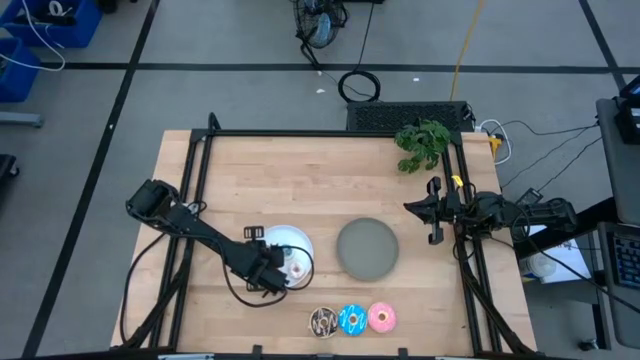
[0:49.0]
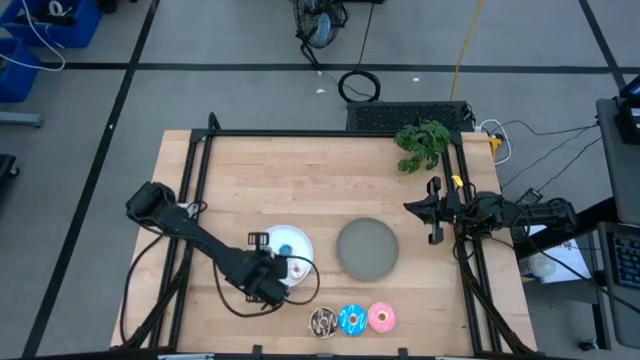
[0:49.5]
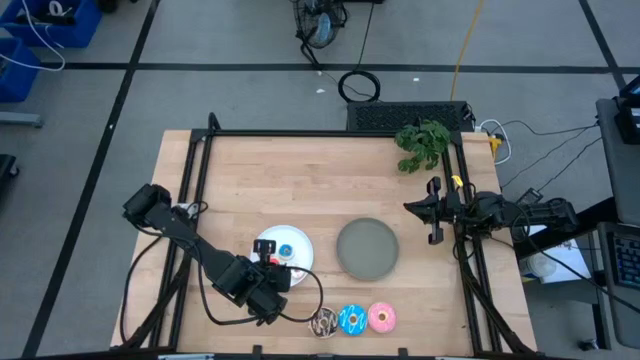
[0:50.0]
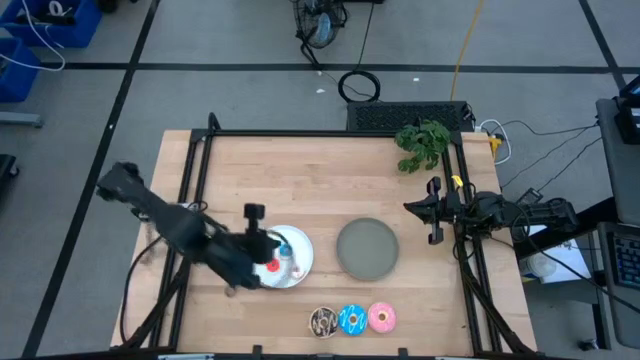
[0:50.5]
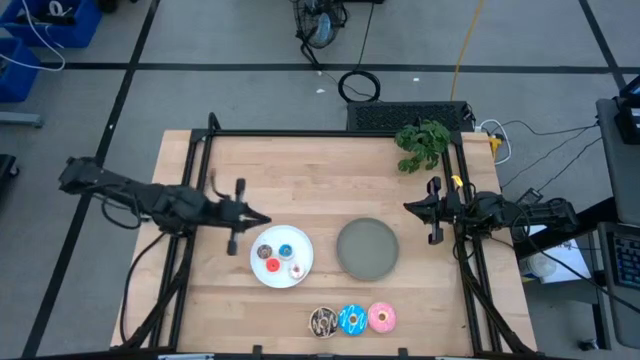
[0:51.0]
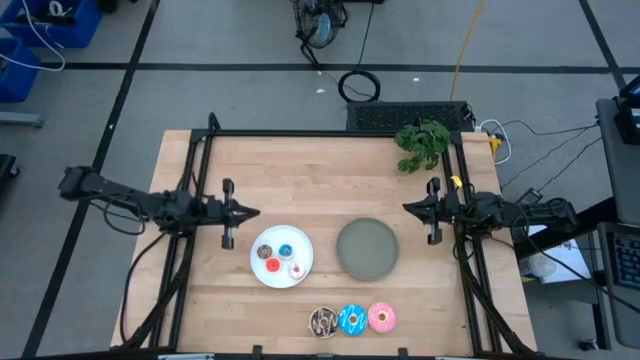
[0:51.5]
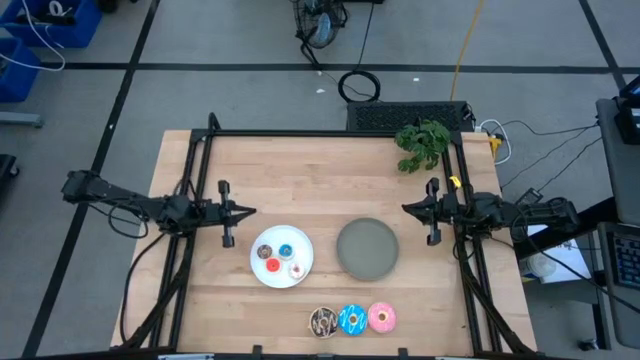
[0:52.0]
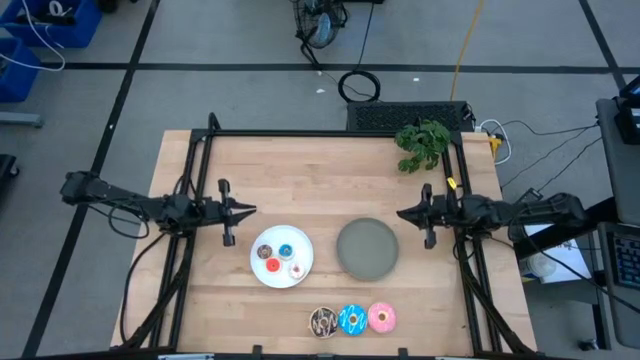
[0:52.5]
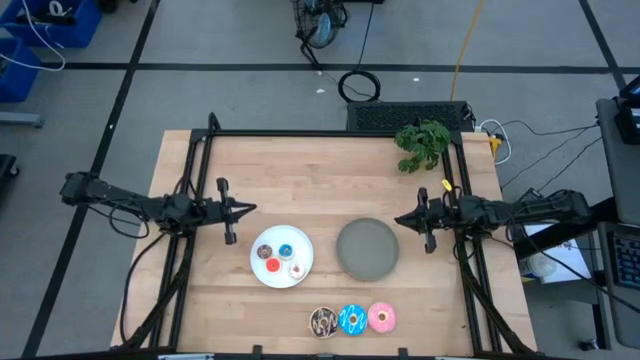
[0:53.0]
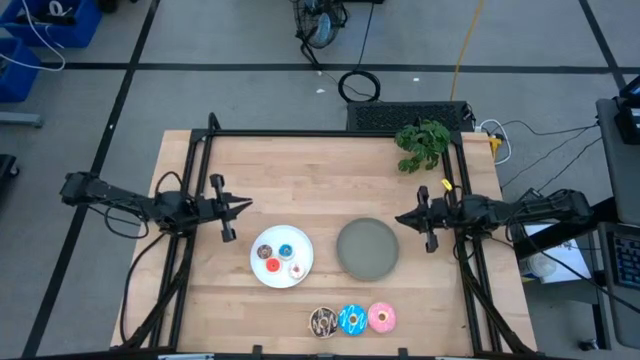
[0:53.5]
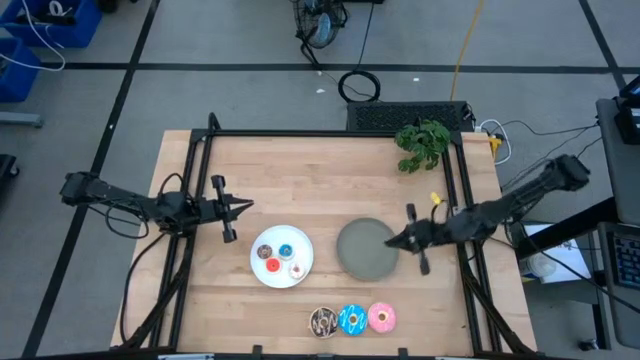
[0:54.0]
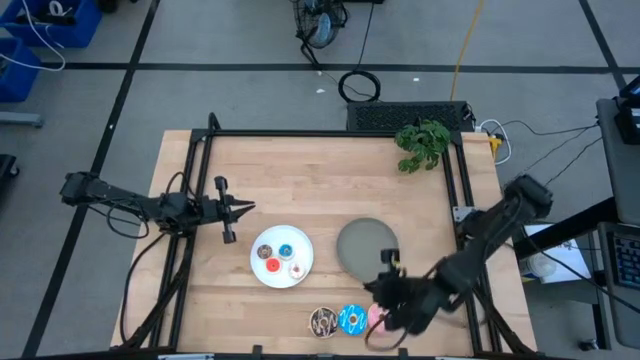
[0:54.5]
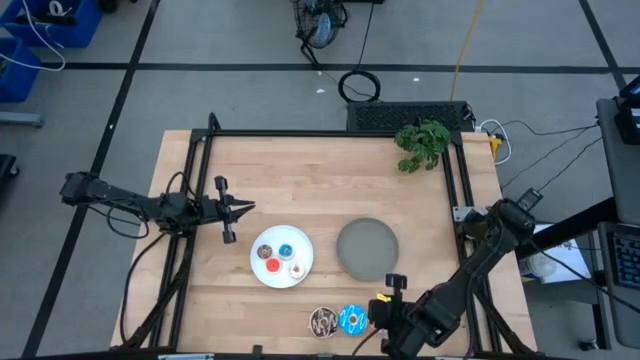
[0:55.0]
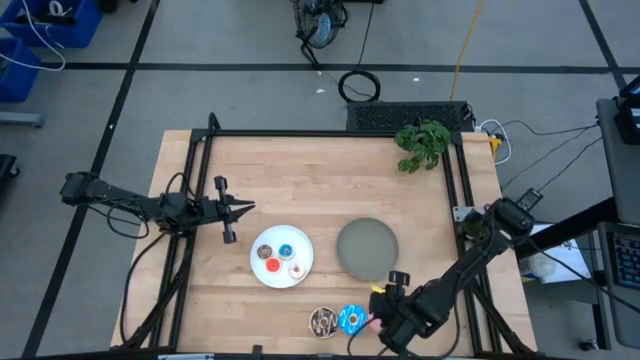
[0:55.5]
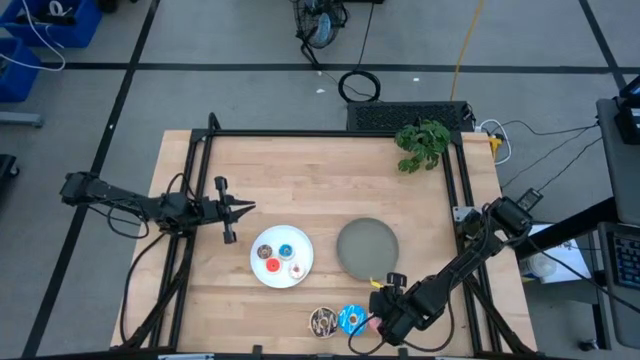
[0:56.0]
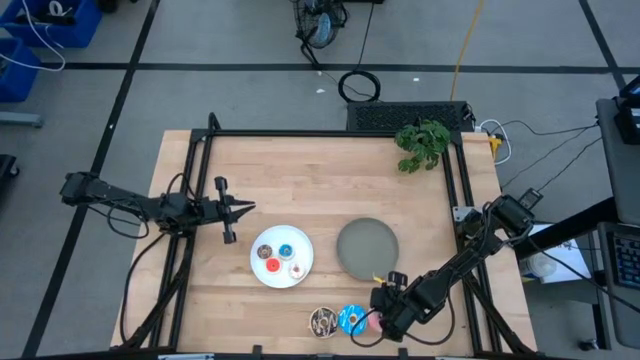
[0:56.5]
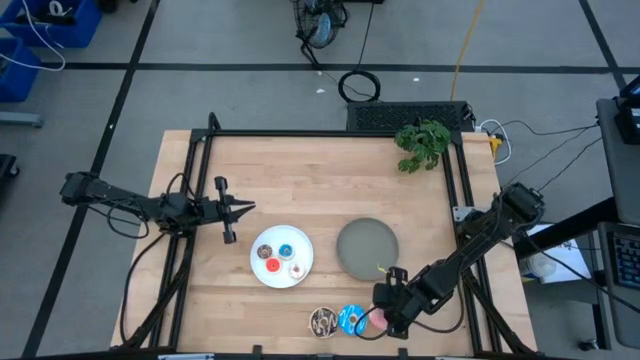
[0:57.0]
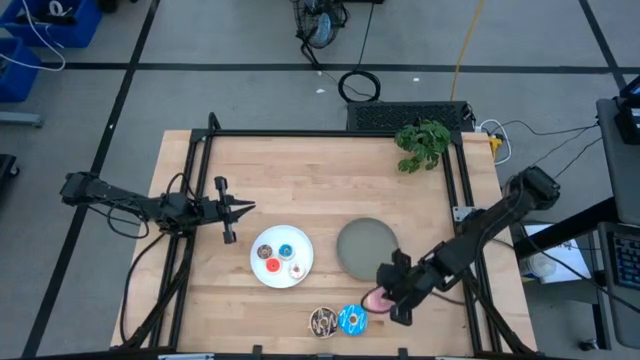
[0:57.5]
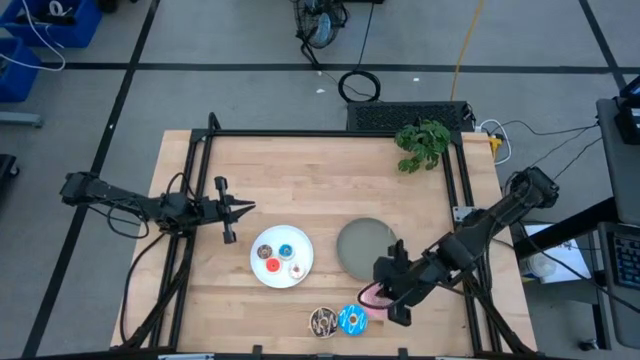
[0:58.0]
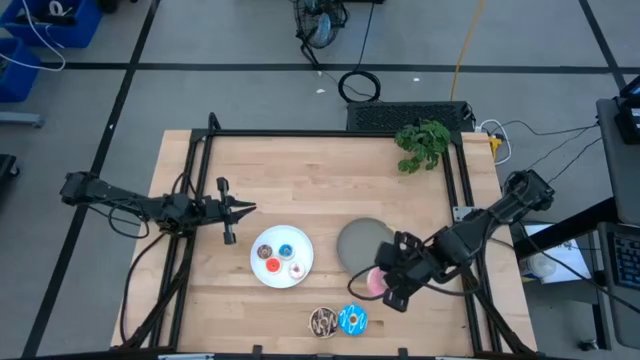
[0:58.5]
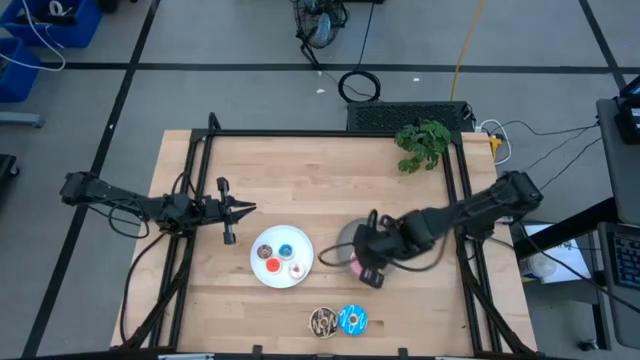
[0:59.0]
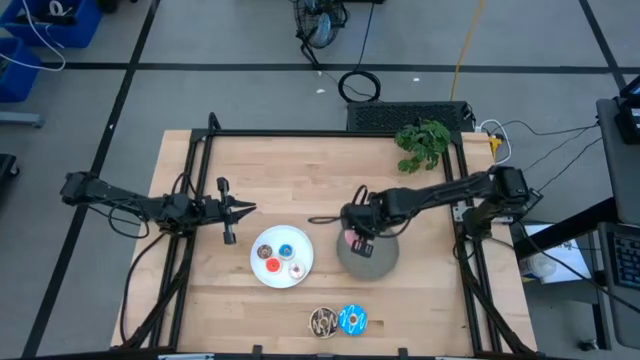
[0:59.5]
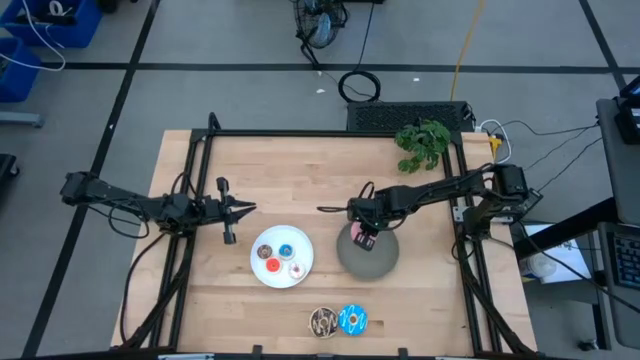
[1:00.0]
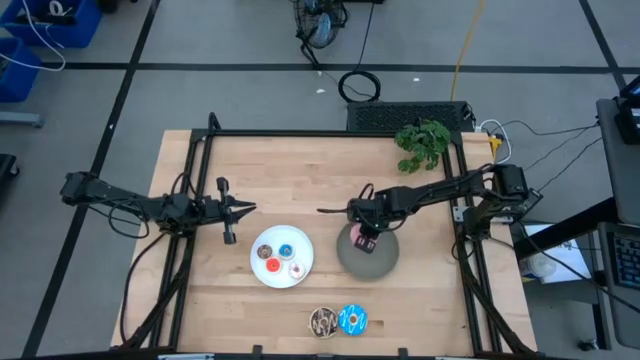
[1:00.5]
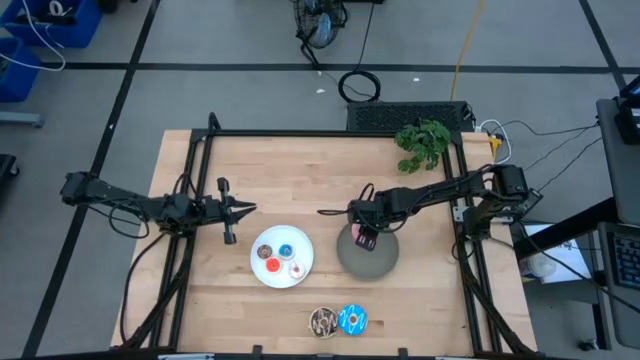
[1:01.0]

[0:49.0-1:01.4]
Task: Pick & Place donuts
Put the large pink donut on the gray plate

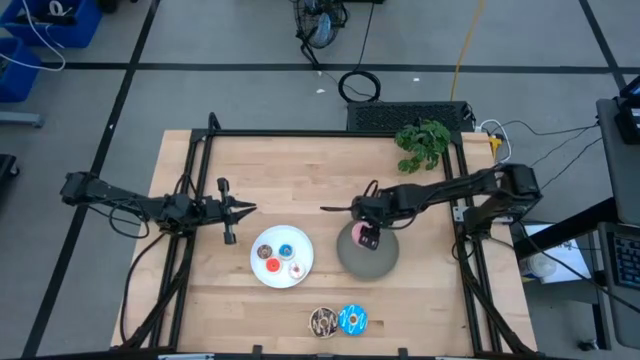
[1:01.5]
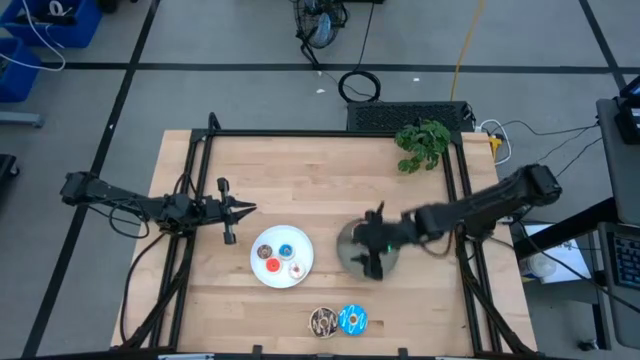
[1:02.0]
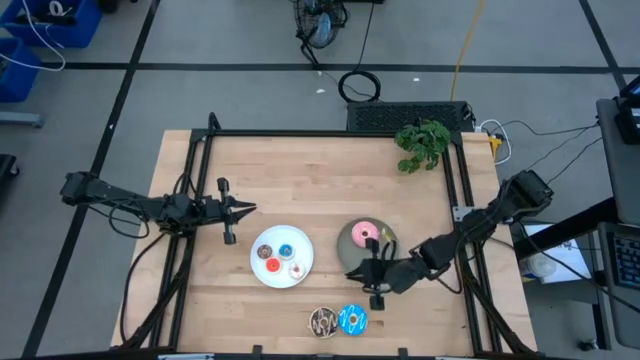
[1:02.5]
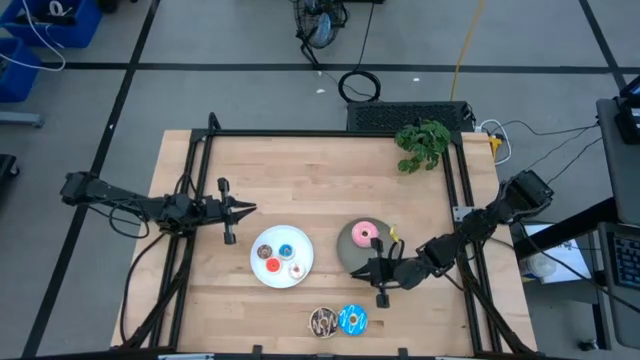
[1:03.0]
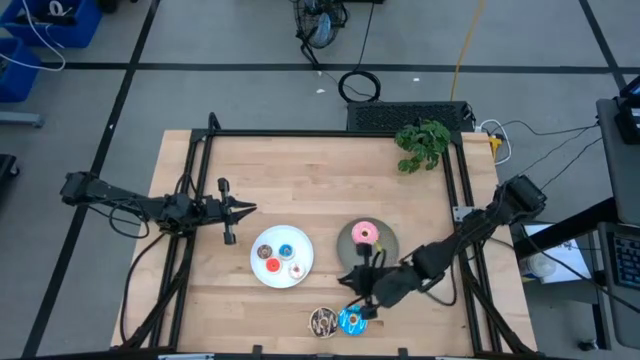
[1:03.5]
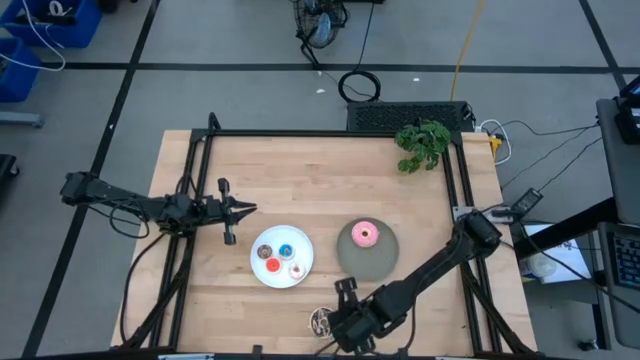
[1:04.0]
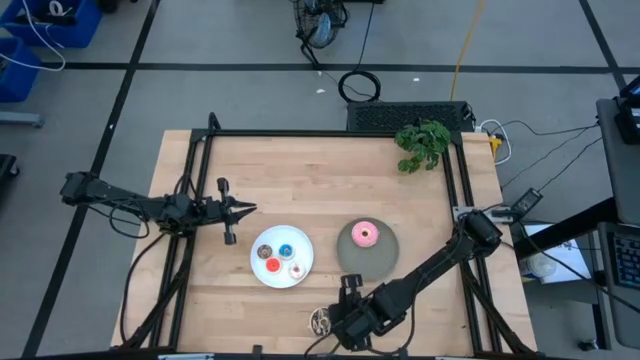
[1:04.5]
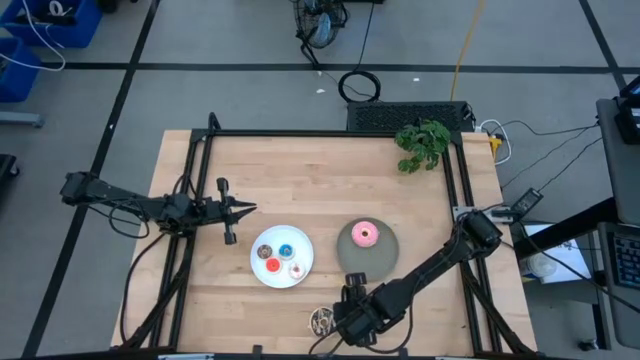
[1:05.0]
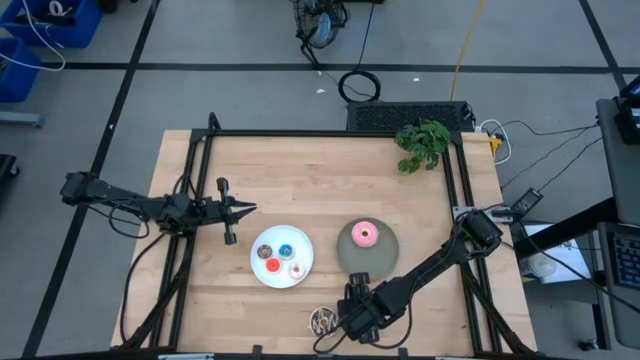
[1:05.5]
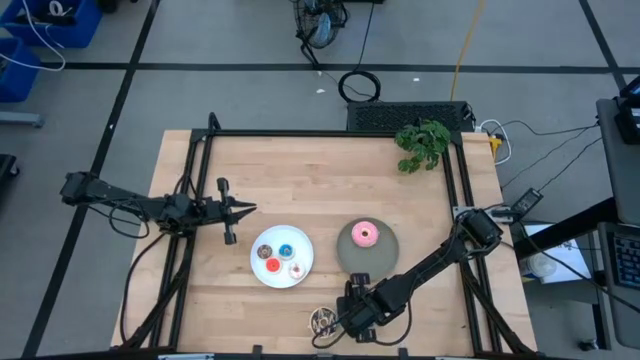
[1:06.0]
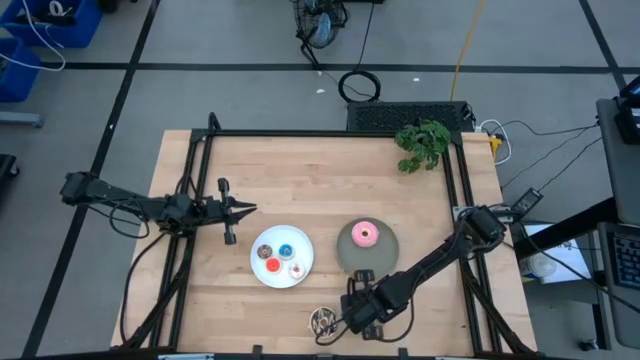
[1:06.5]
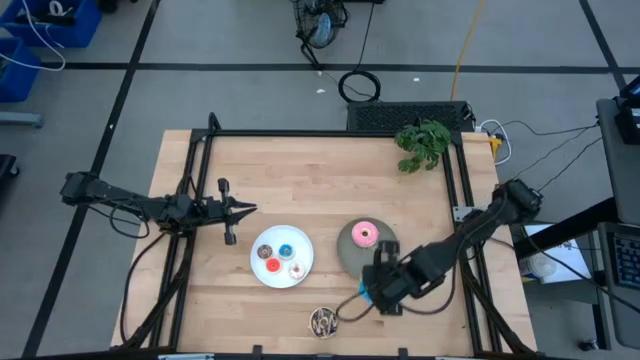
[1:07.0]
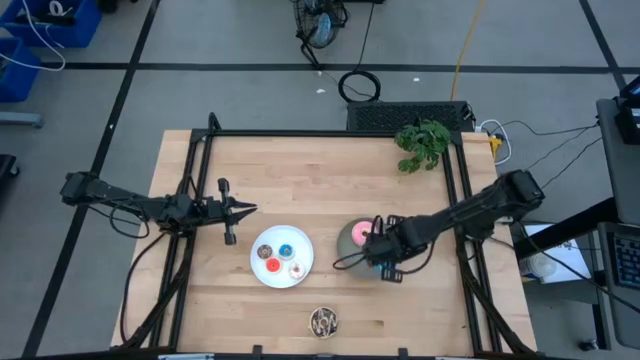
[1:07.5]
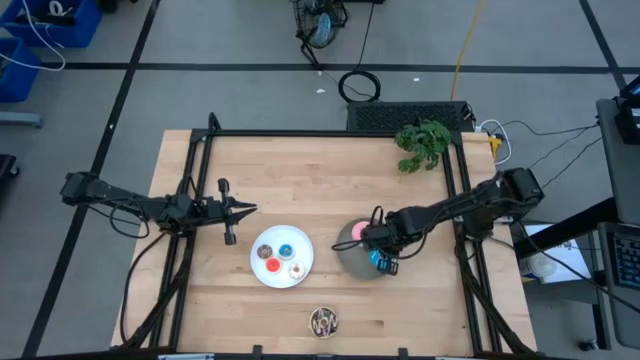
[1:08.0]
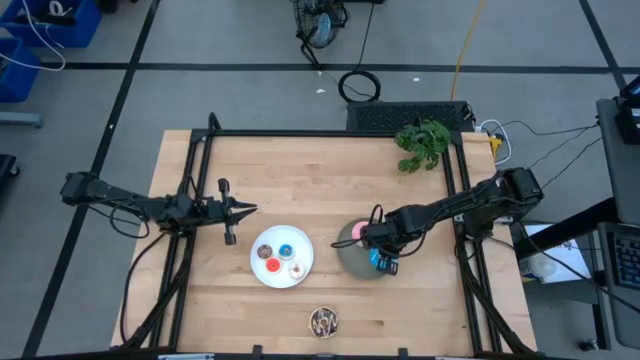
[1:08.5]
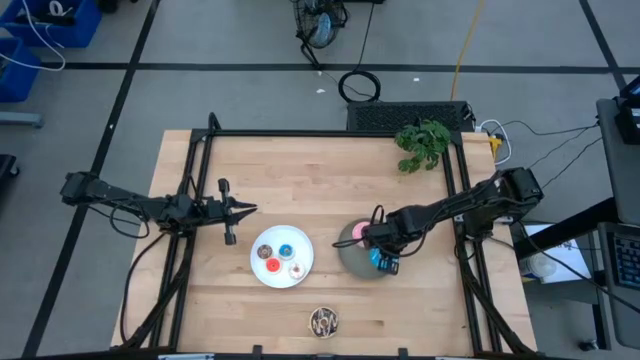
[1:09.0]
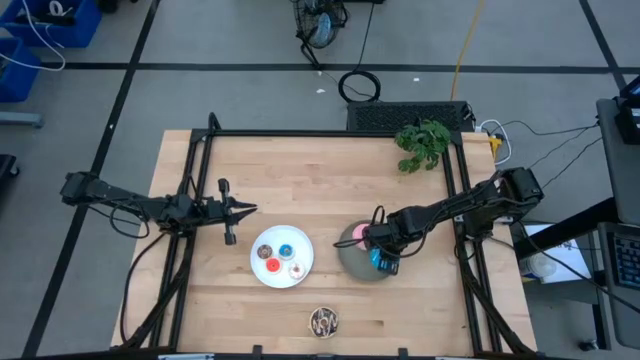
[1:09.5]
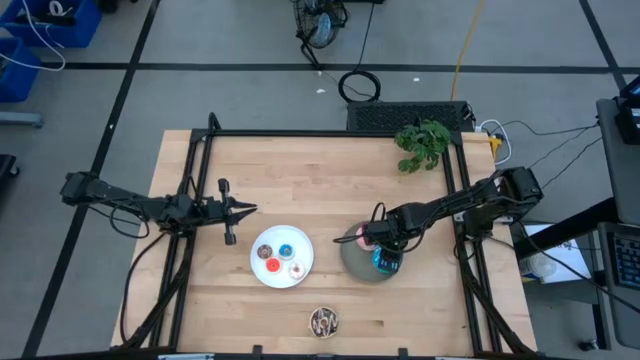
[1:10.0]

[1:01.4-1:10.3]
Put the large blue donut on the gray plate
